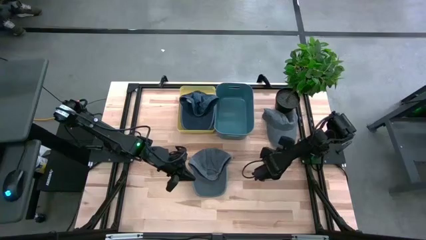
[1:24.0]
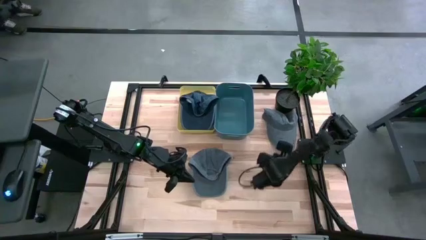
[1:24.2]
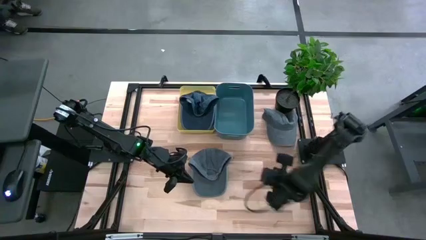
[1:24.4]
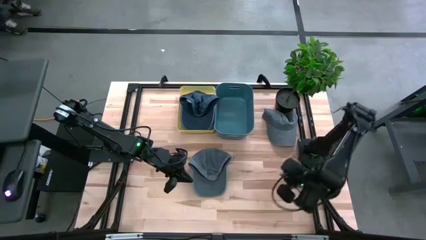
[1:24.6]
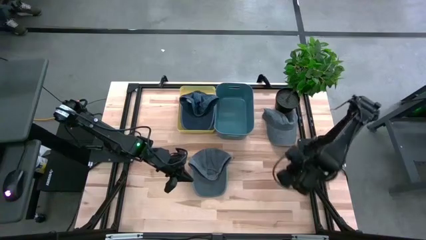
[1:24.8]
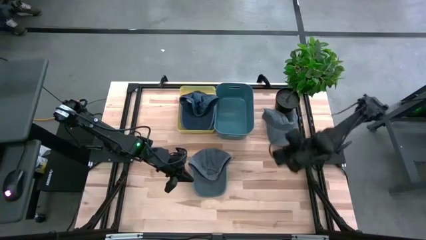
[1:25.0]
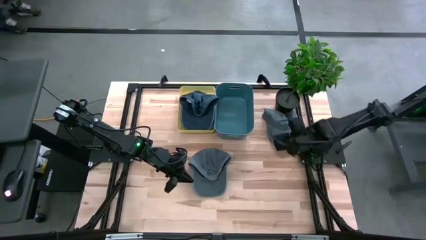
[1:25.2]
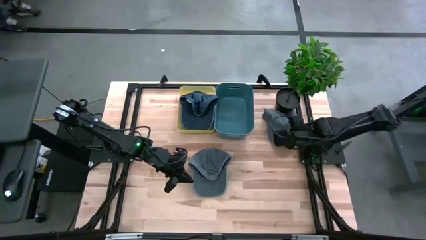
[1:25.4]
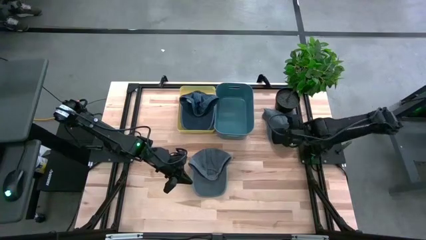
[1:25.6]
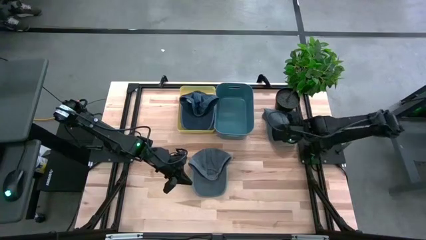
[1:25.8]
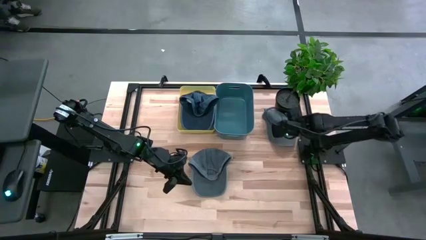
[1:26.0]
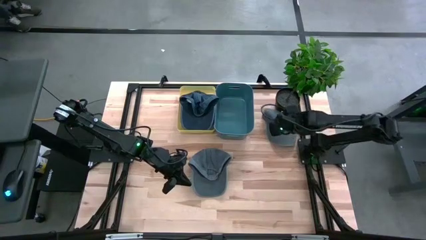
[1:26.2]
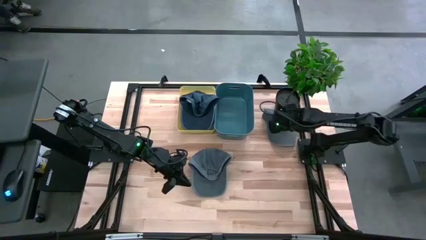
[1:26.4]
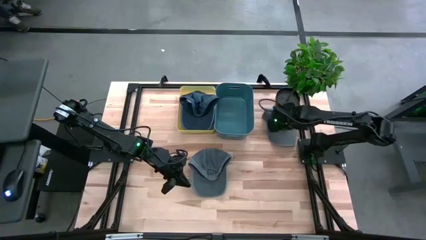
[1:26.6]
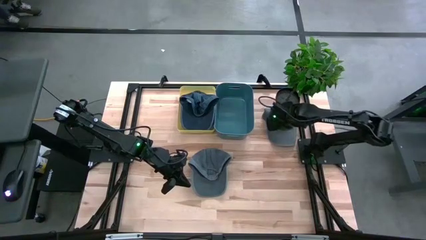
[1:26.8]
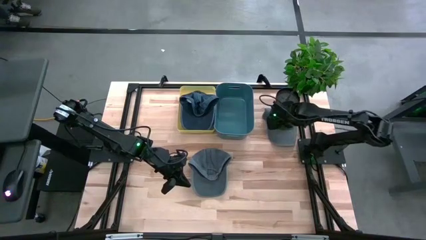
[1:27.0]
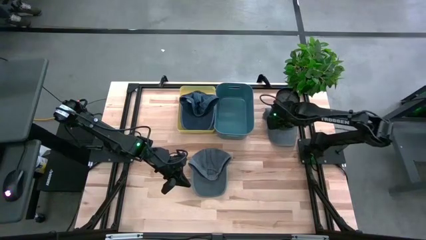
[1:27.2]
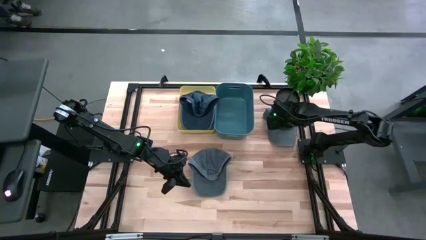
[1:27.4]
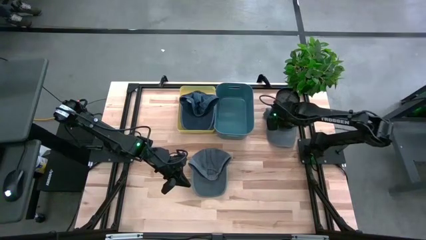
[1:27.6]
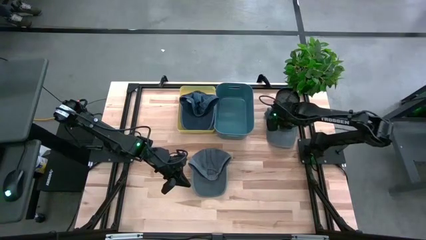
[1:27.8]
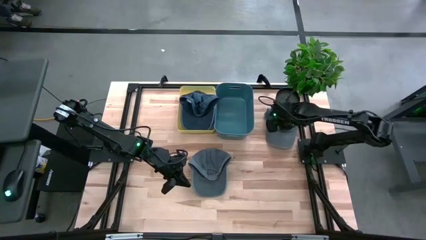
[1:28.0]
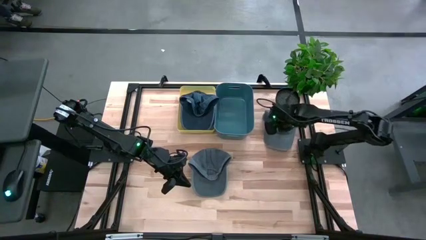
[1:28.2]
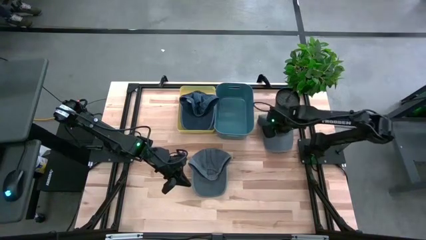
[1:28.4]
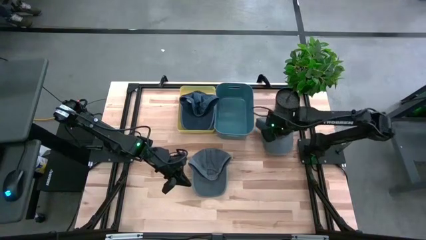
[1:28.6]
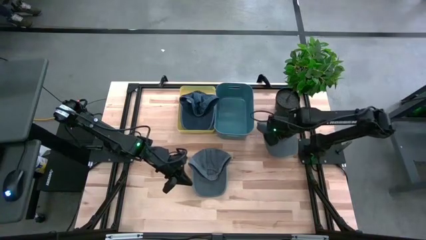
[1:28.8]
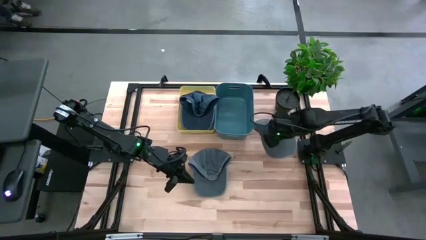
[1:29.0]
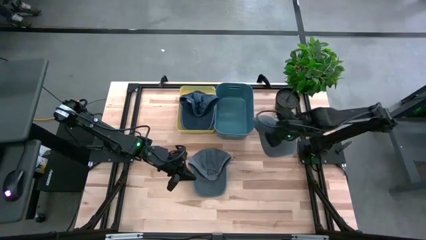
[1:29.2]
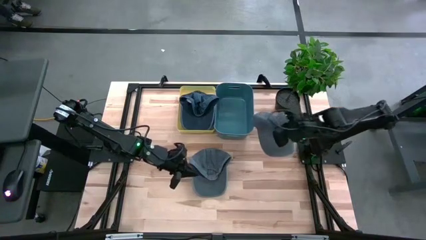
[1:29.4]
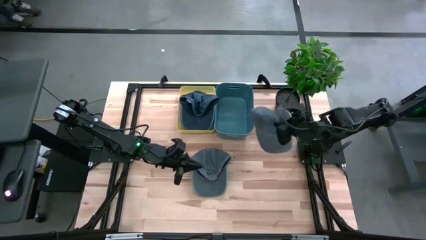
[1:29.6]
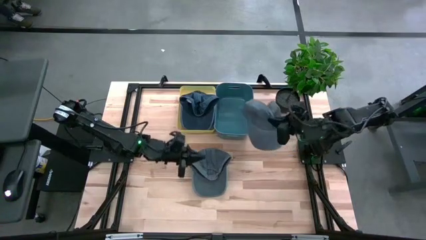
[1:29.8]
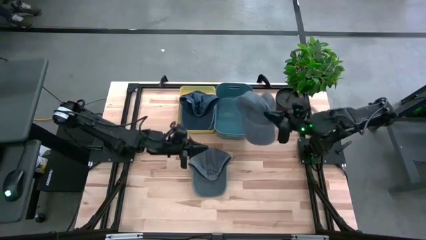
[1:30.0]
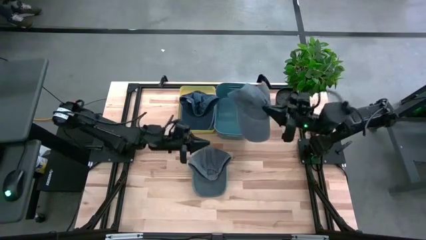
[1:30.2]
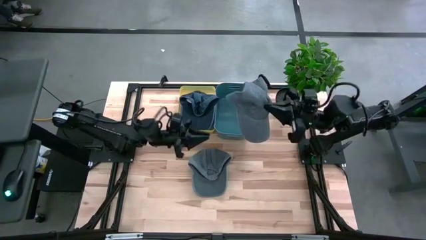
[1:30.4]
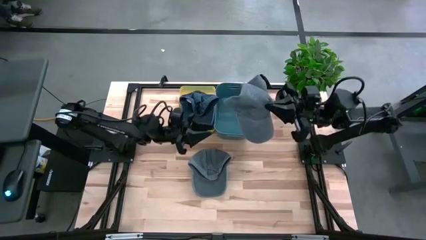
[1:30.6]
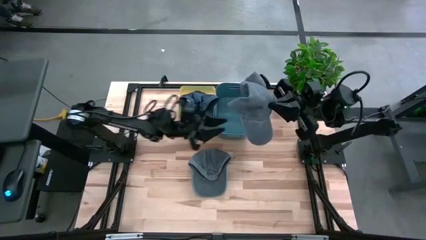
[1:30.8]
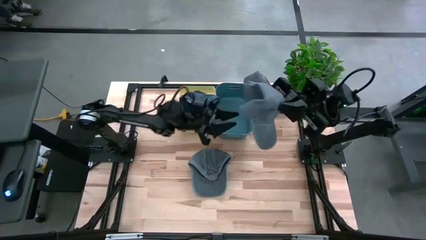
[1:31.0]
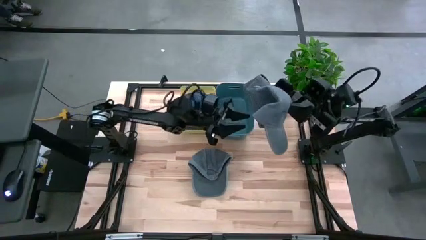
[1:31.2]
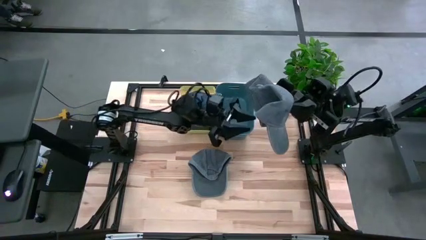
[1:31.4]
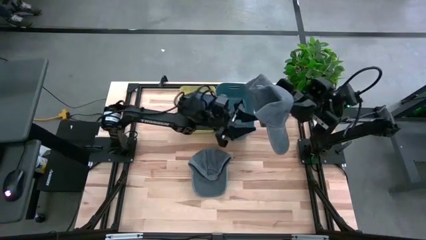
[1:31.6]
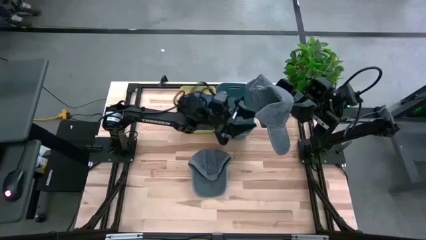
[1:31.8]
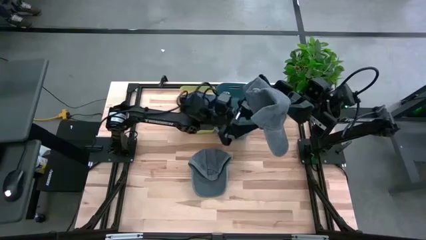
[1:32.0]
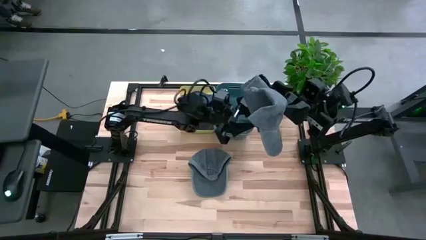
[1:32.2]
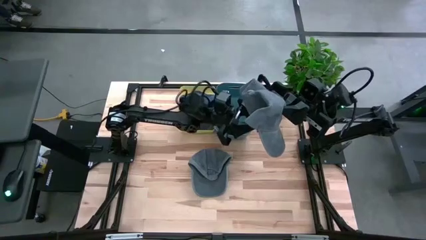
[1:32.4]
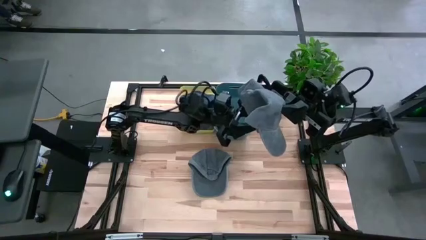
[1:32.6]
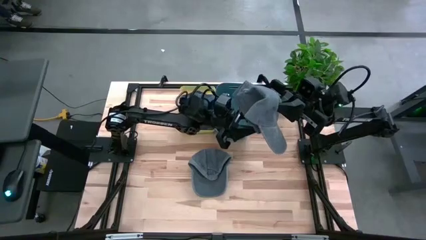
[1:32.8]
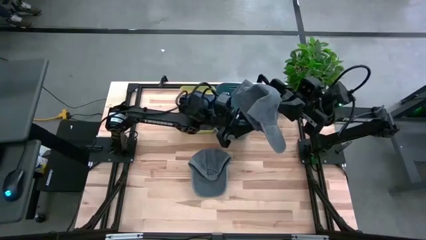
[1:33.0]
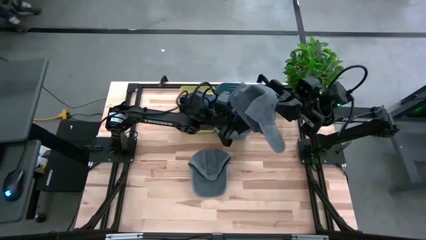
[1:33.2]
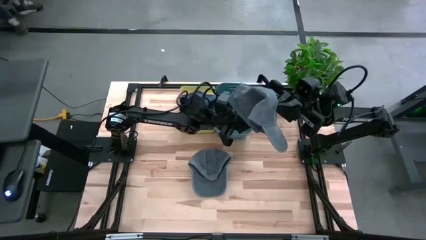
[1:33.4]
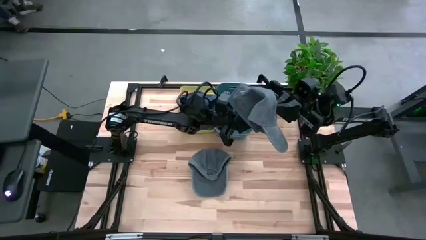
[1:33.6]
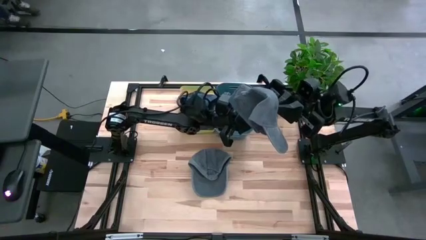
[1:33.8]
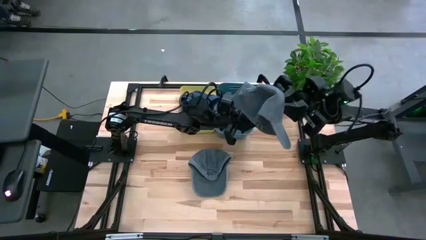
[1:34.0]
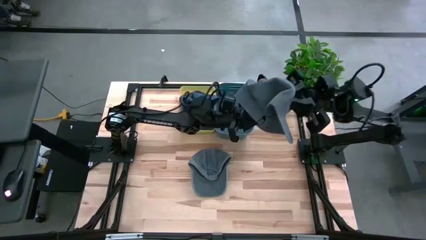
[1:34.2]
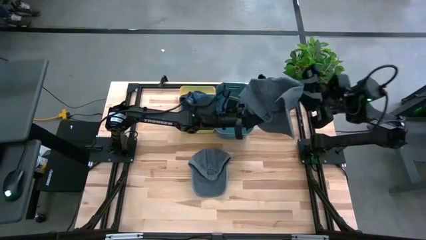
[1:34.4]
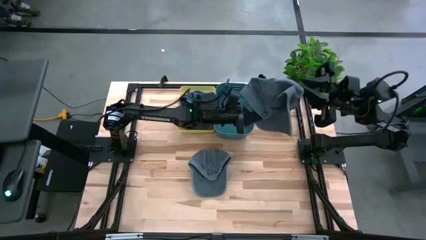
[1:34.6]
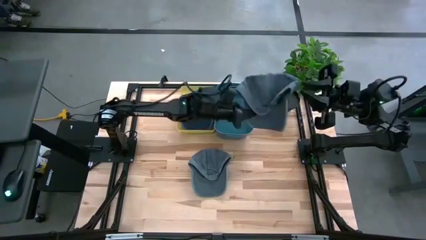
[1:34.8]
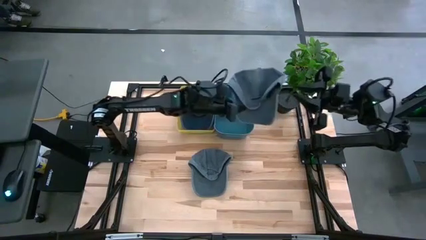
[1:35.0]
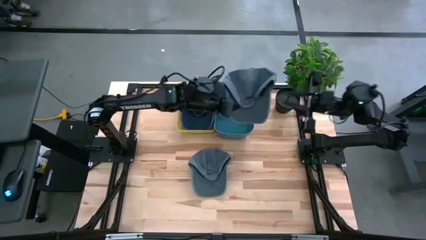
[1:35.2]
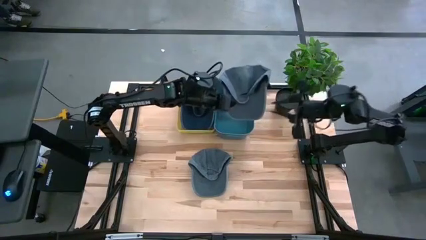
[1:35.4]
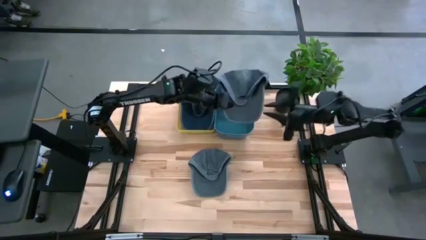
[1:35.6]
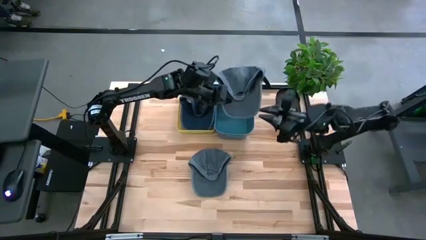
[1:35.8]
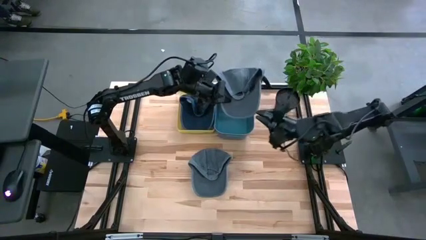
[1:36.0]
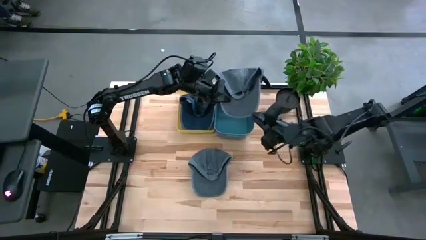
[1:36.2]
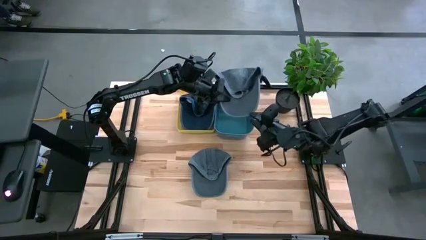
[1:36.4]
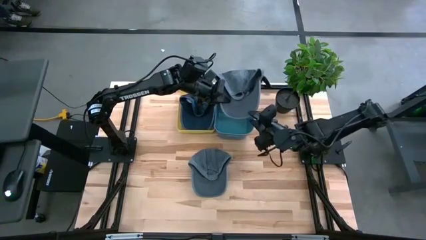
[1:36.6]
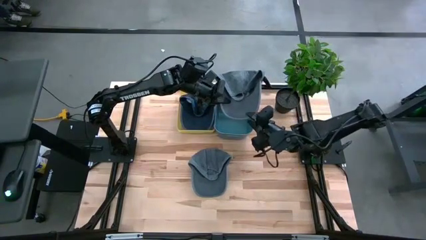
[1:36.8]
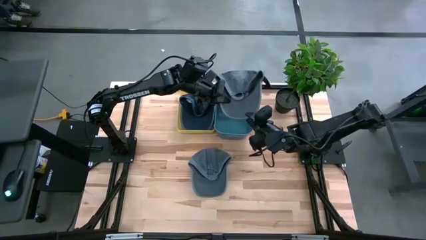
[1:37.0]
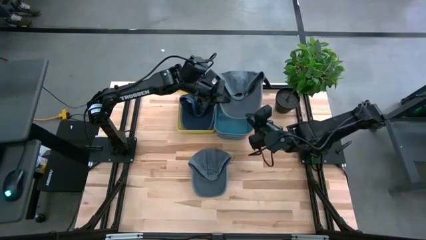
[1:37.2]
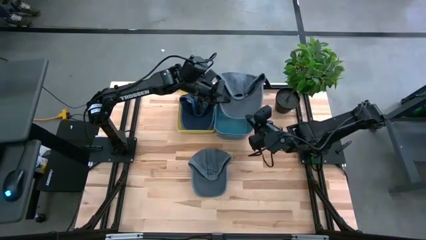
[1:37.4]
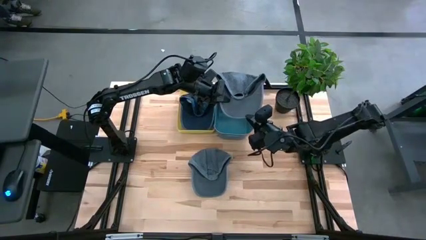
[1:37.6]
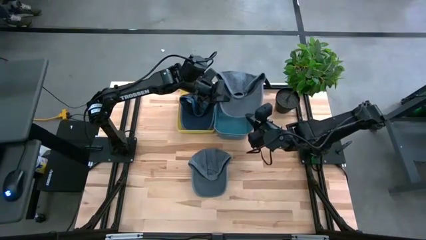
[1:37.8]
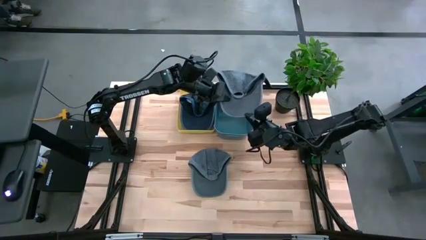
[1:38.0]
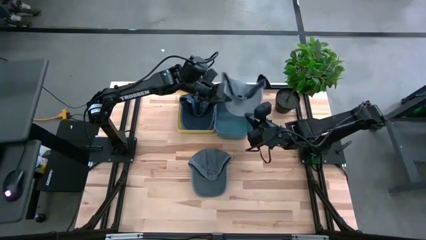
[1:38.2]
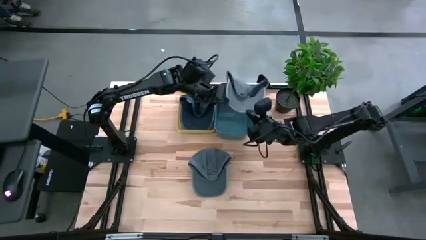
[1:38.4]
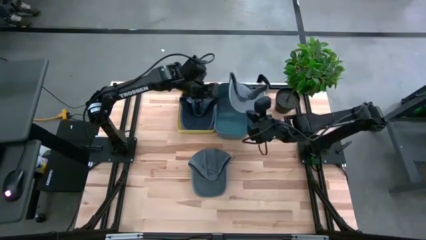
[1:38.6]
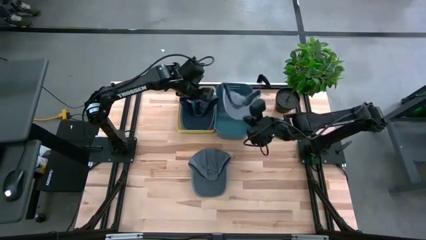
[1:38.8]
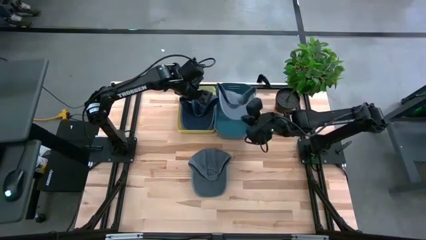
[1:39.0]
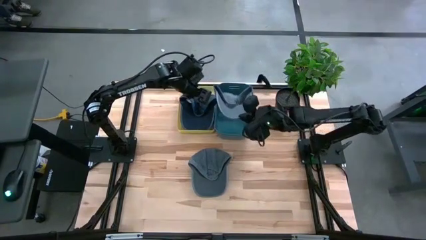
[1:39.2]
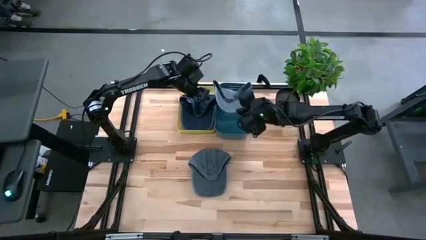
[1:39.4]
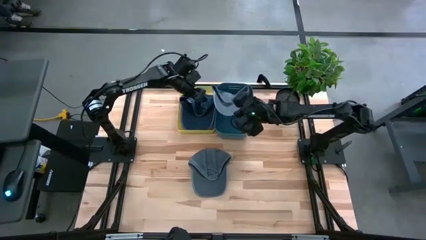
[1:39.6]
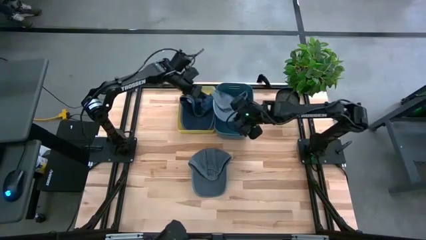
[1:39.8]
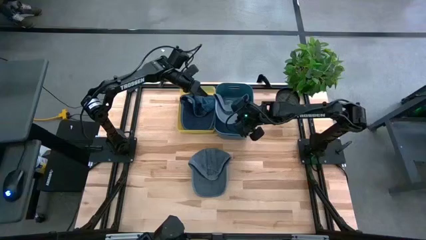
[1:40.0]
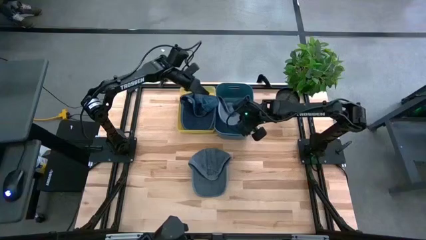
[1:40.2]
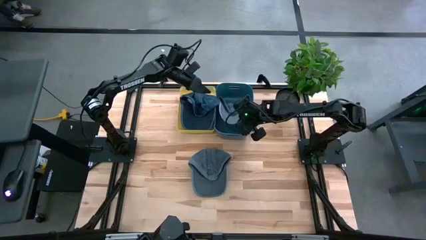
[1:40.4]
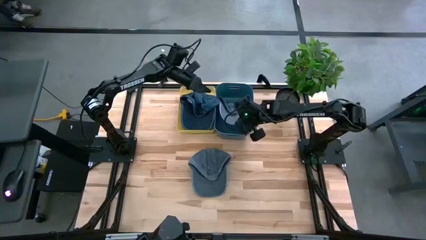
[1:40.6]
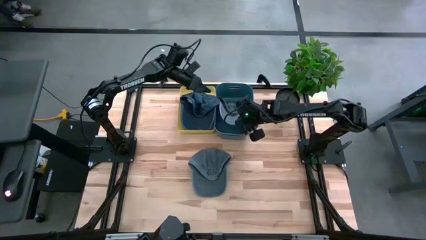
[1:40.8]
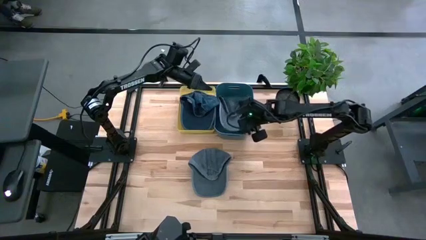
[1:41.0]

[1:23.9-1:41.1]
Task: Pick & Place hat
Put the right grey cap into the grey bin
